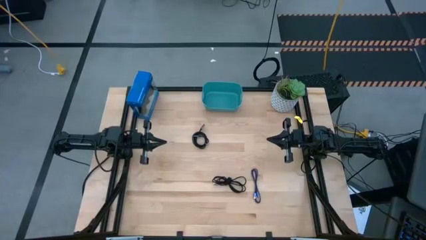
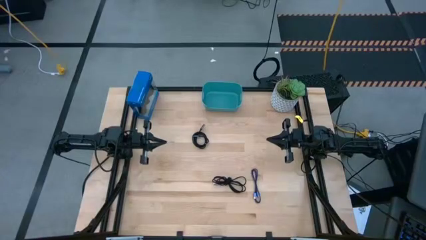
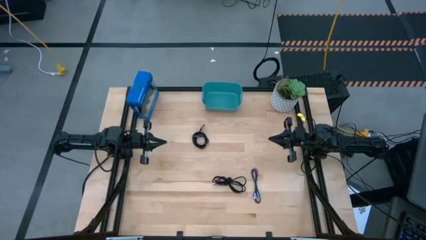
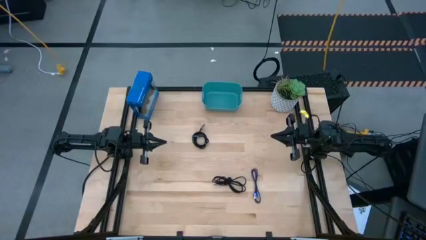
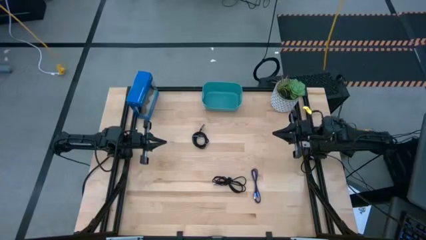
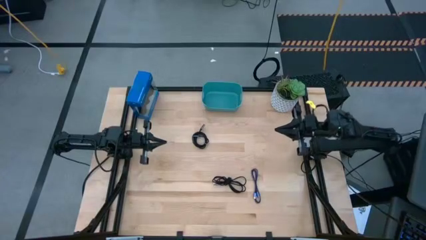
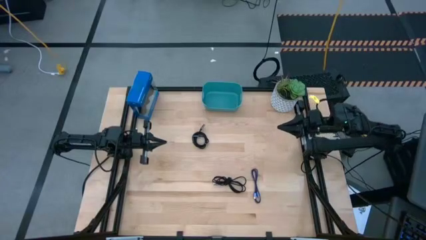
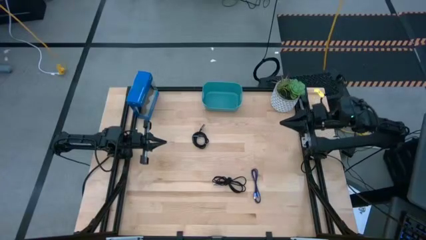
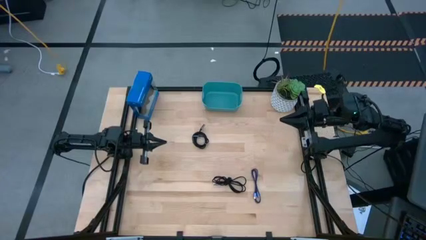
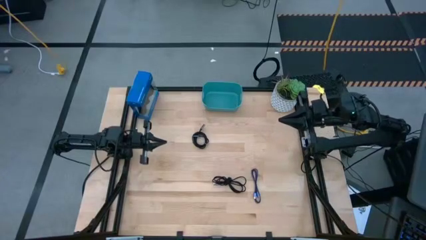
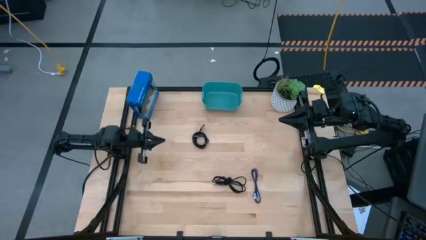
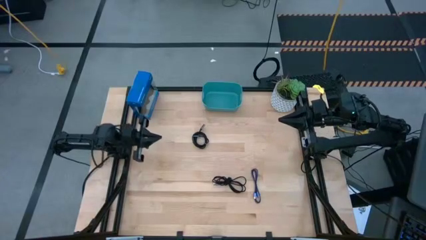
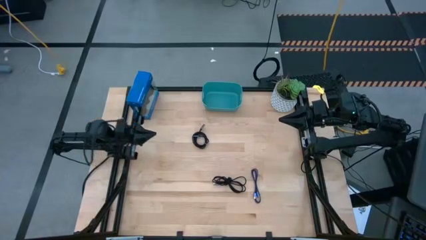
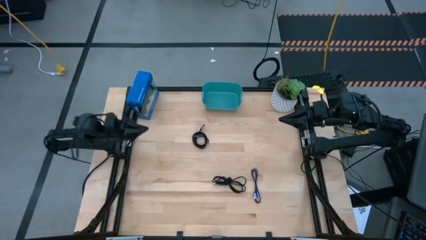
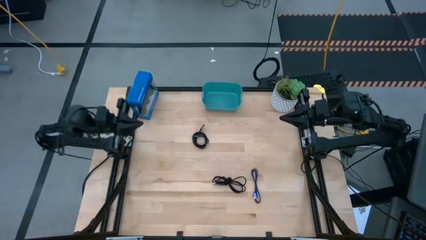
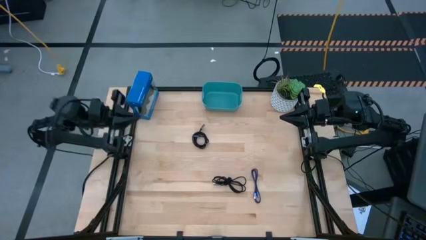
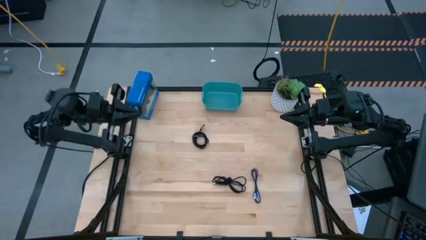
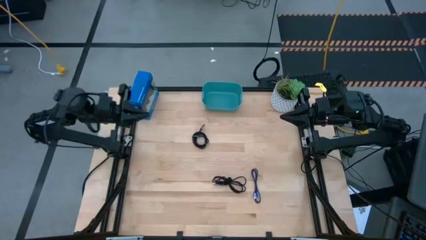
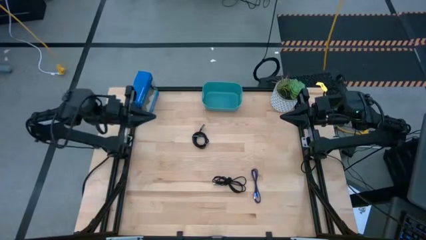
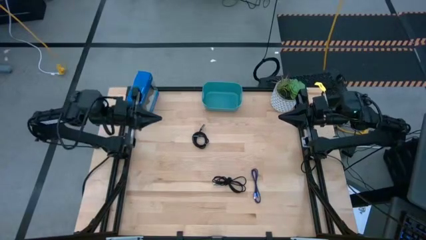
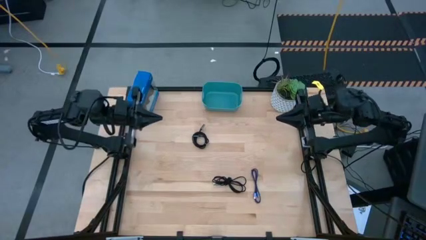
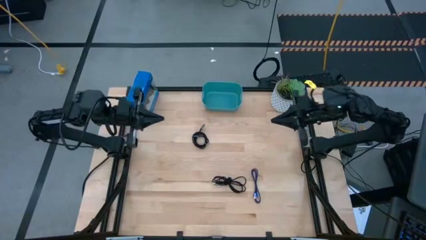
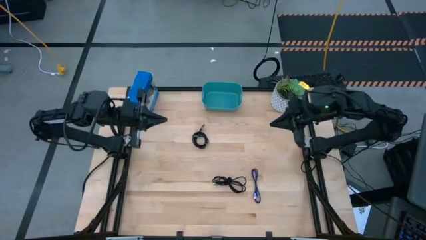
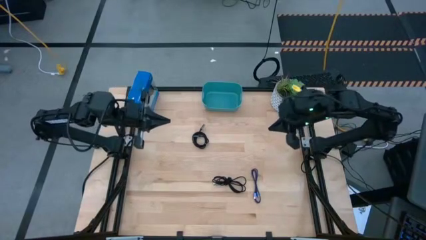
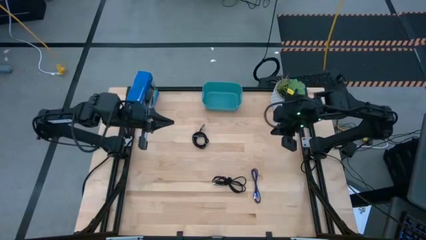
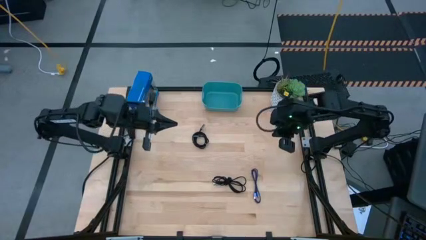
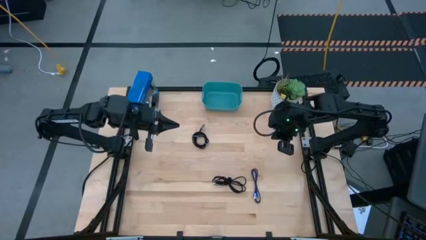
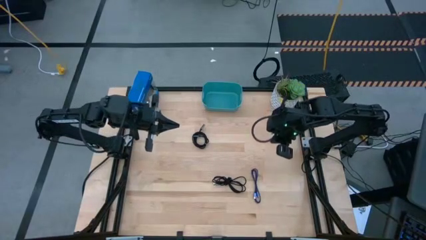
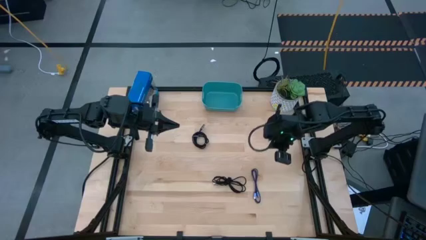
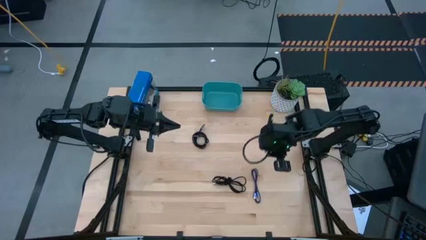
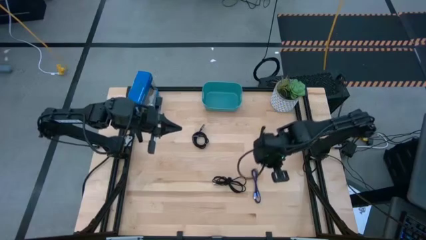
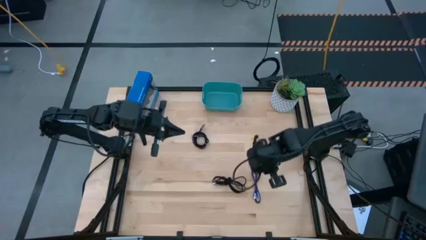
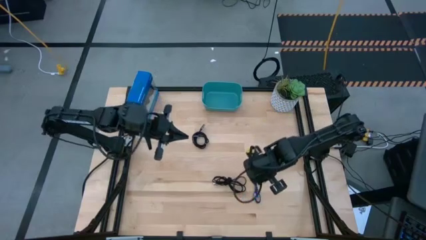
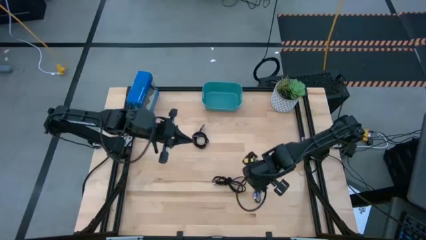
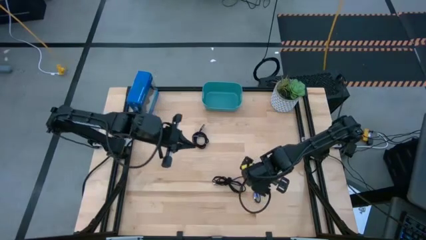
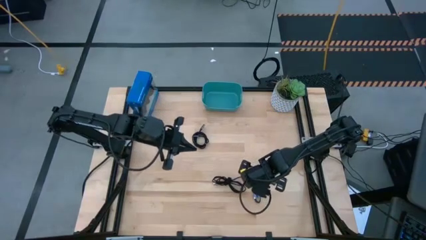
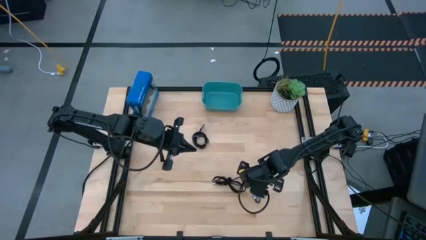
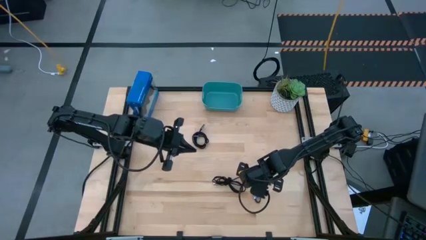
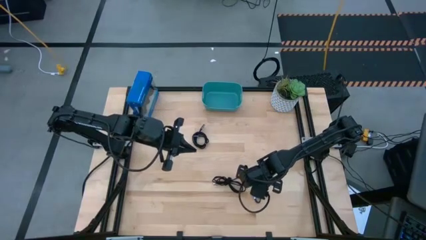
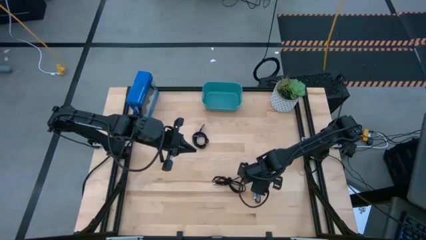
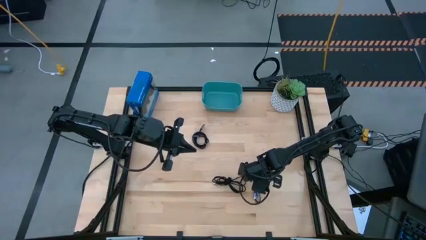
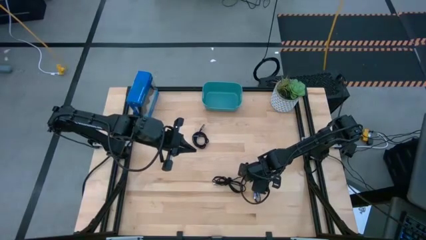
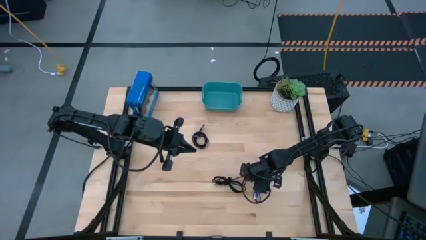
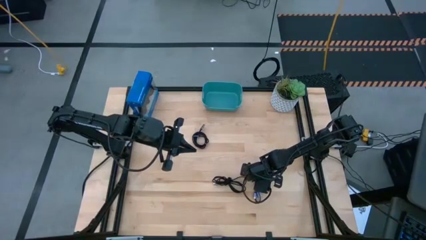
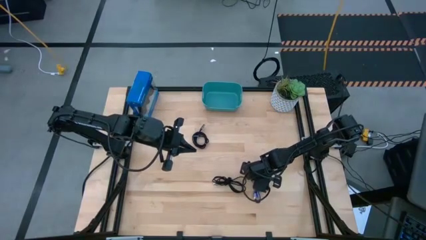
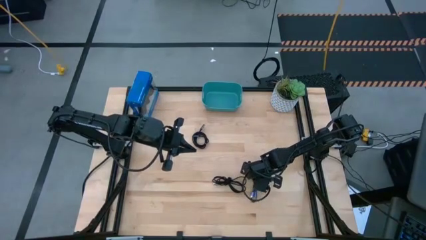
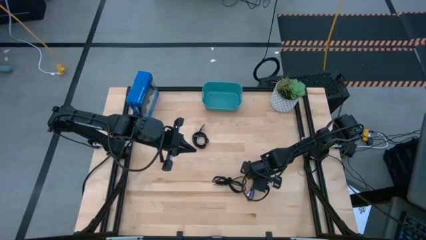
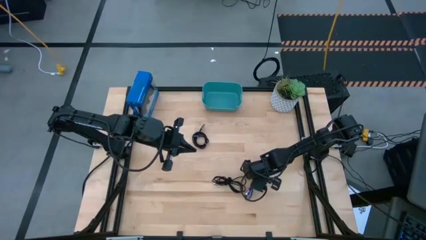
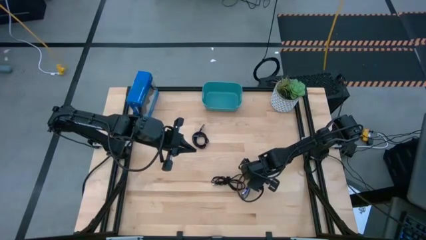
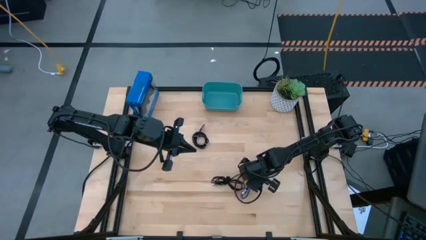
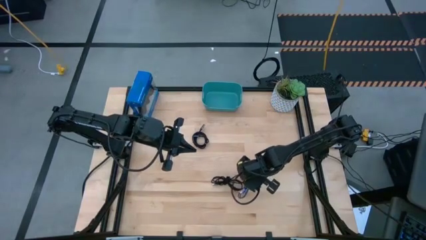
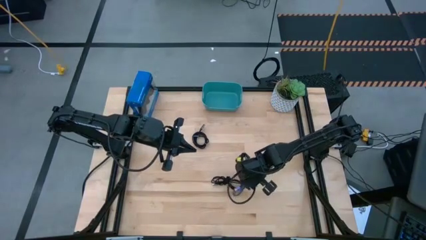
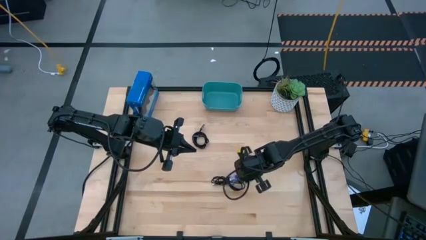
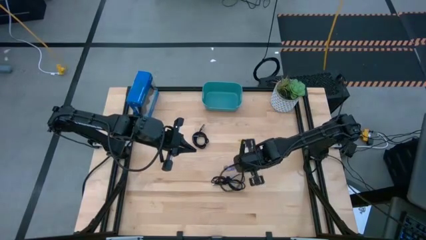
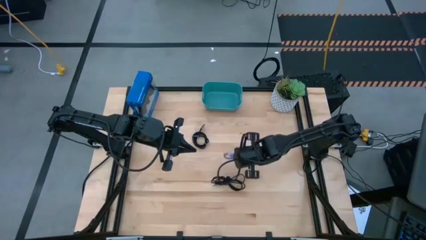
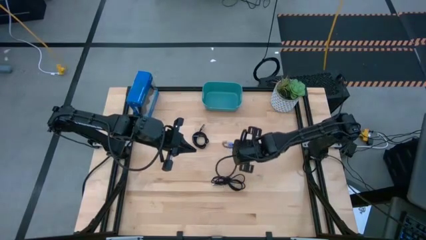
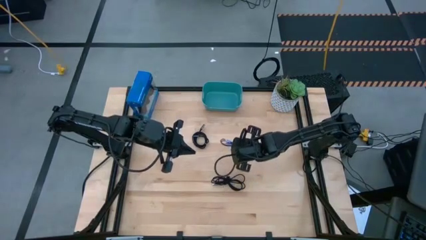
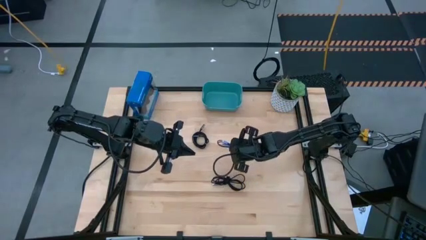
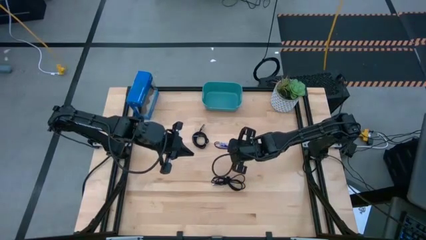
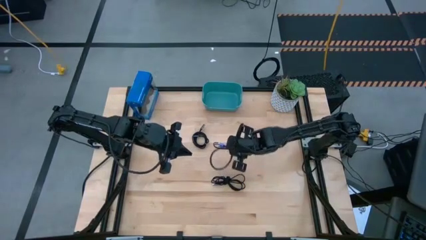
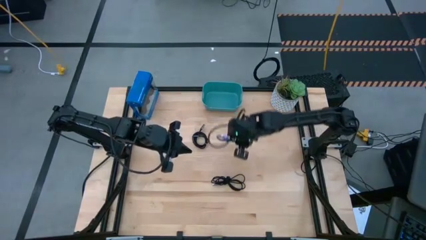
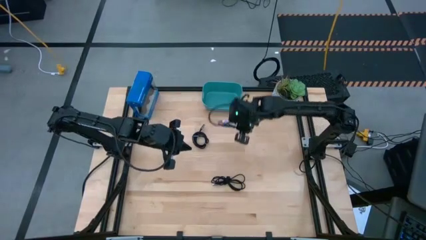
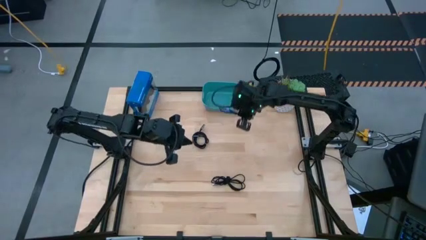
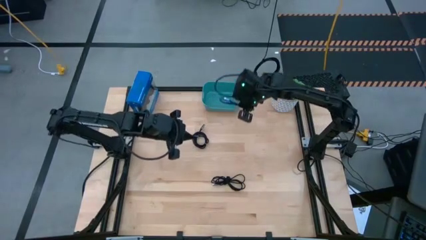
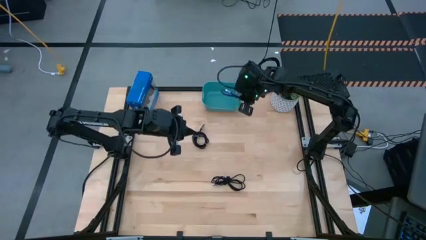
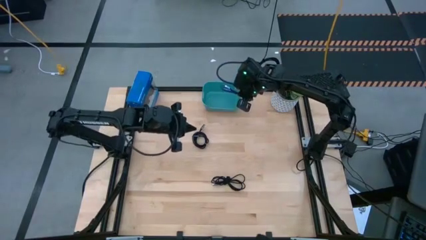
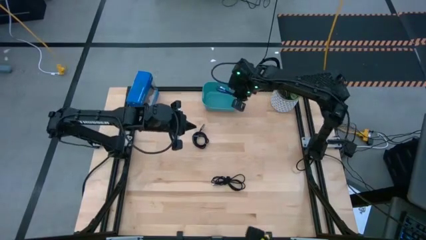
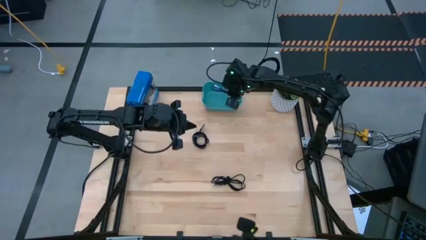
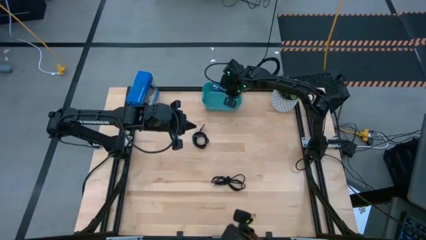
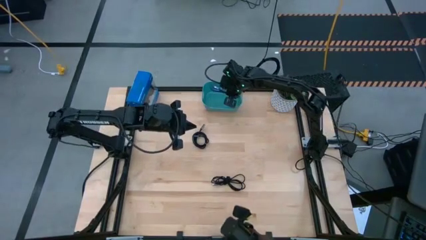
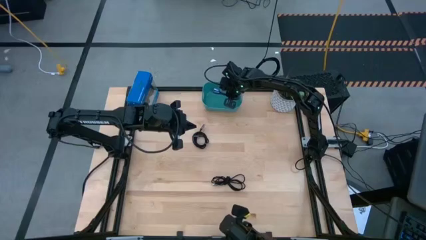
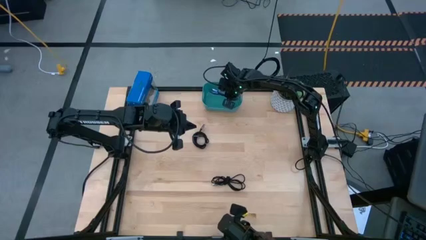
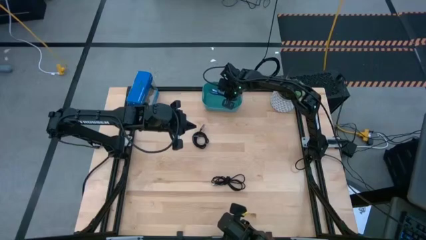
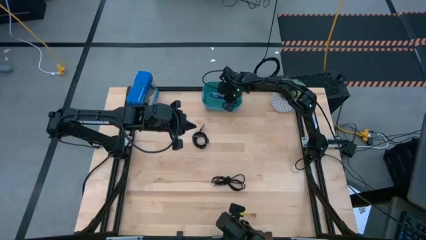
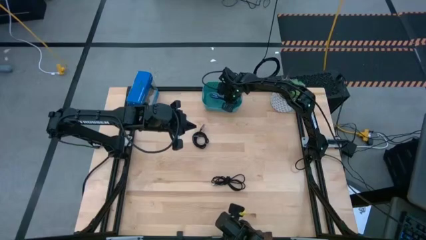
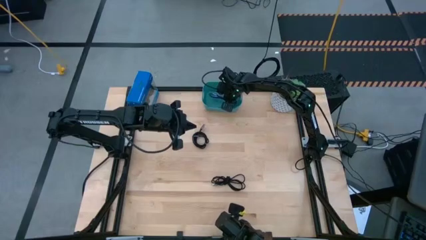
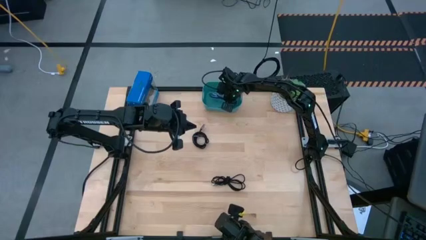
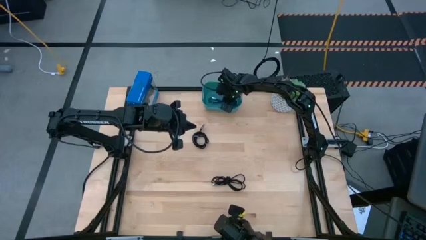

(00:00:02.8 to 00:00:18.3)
Task: Pick and place USB-C Cables
Put the blue charger cable into the blue bin
